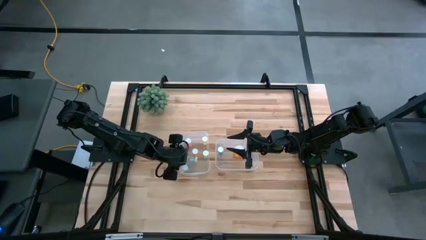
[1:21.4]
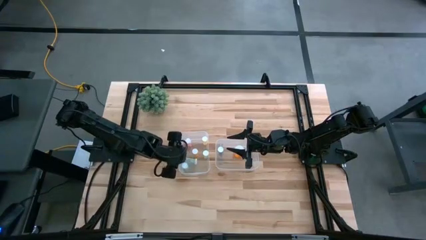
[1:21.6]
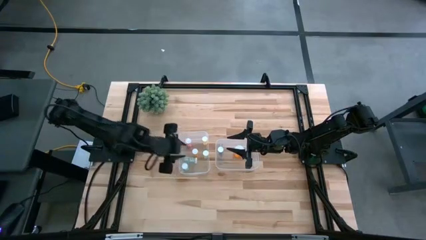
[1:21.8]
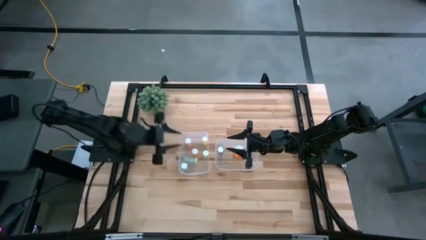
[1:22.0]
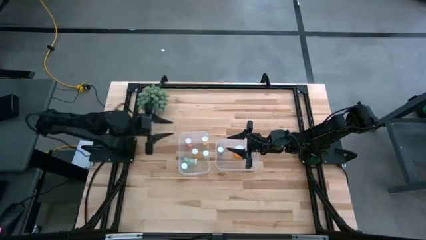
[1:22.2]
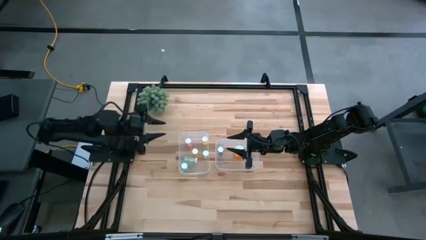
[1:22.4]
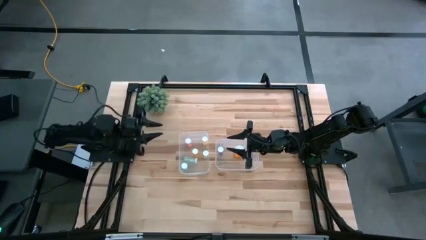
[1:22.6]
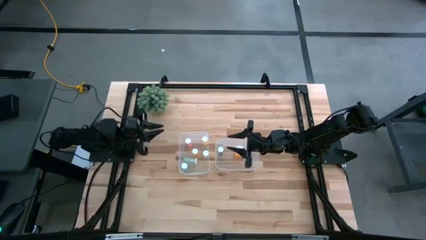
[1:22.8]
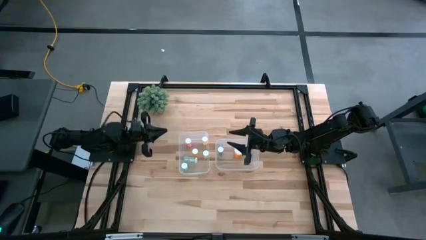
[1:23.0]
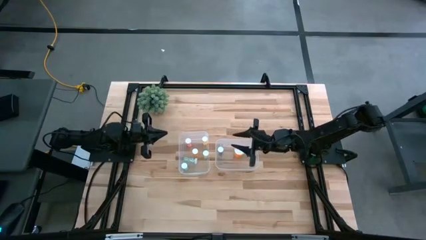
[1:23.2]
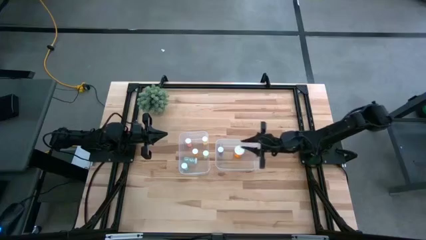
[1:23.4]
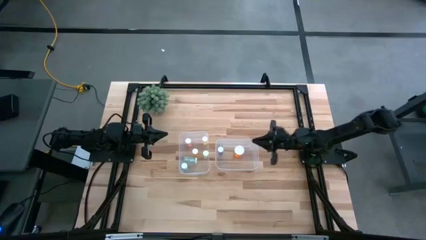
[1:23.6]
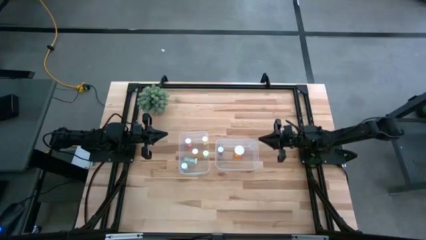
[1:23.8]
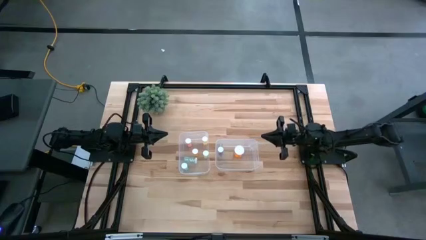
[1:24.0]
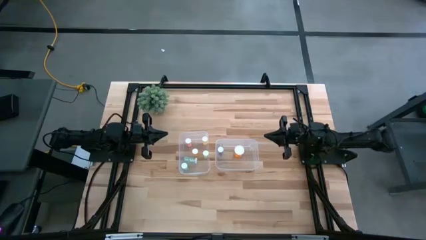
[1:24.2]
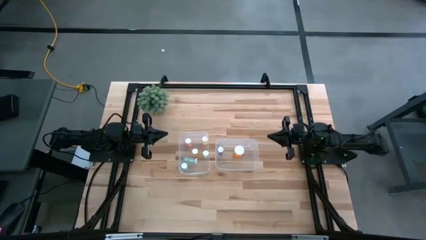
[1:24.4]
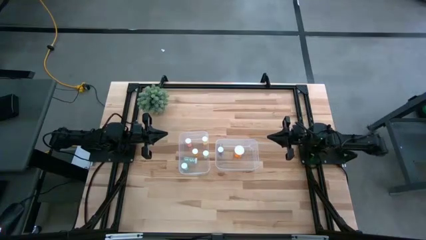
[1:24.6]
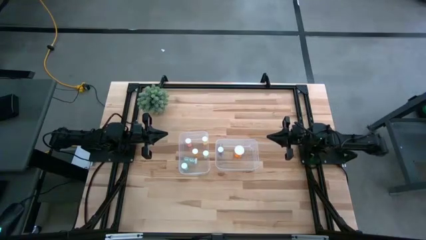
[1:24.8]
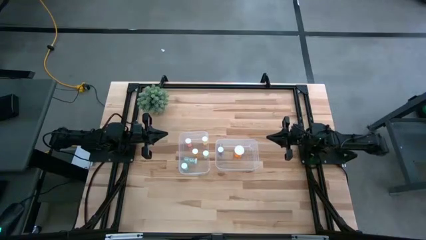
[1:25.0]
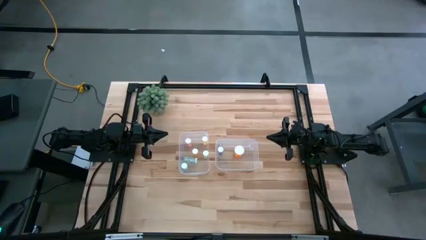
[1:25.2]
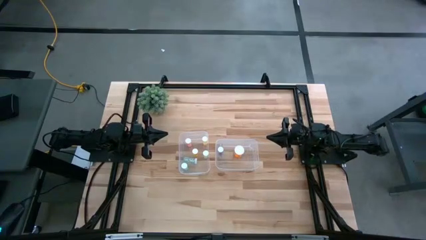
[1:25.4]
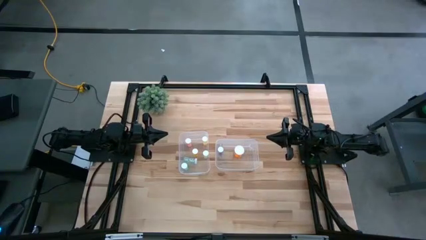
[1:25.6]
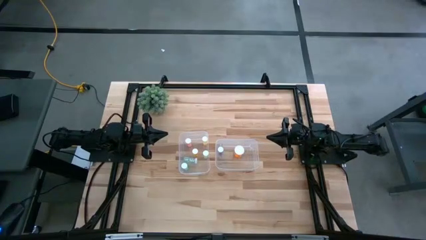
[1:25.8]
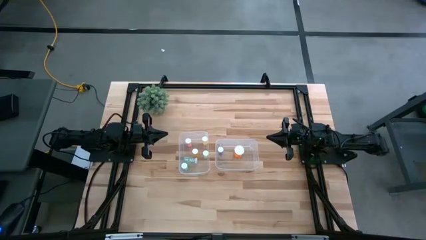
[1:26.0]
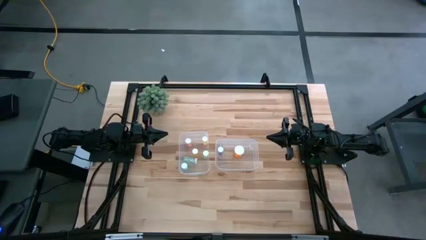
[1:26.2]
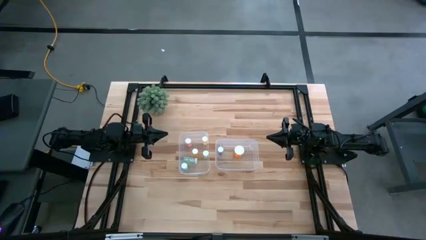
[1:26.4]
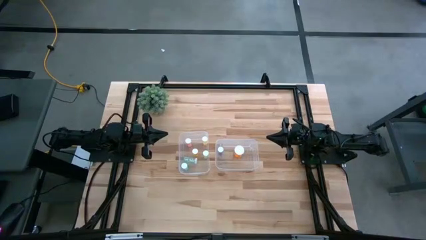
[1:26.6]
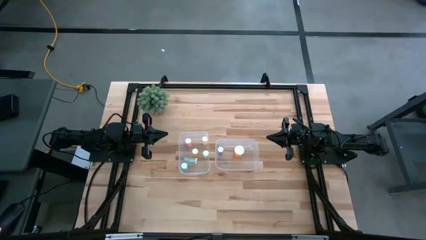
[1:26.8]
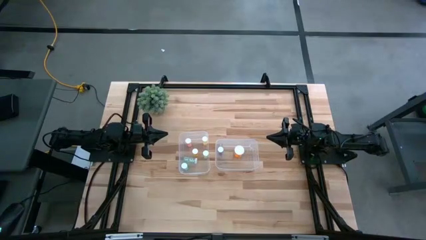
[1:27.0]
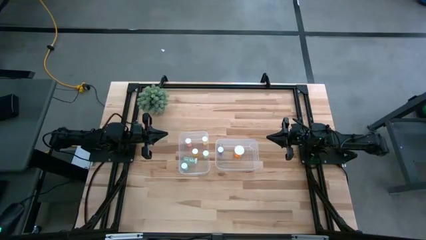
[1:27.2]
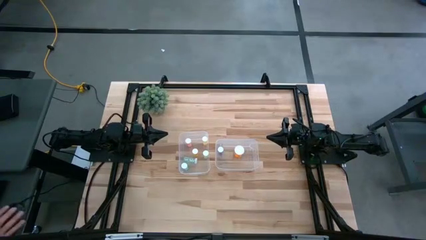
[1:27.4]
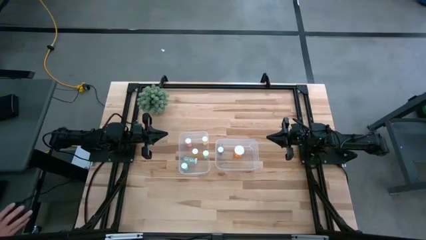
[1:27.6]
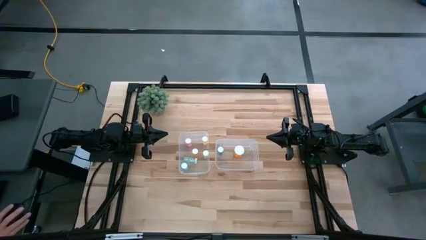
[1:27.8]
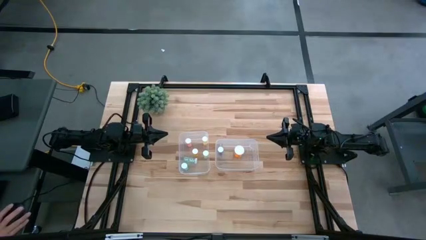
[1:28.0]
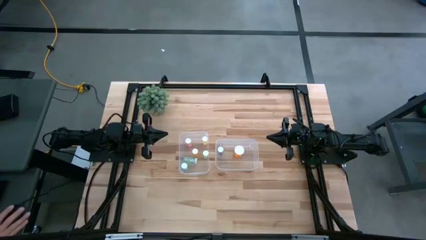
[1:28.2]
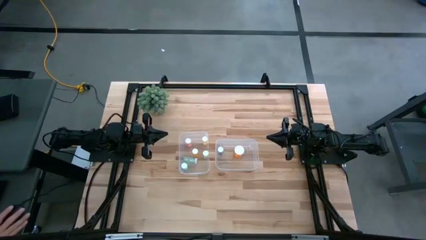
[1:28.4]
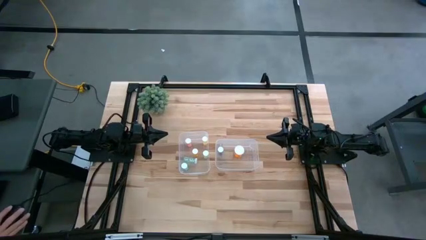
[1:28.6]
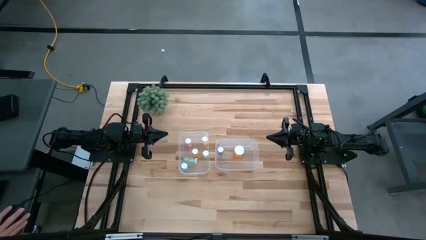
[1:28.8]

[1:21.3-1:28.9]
Task: Pick and place medicine bottles into bin by pill shape (circle, oval)
Return to Home Position

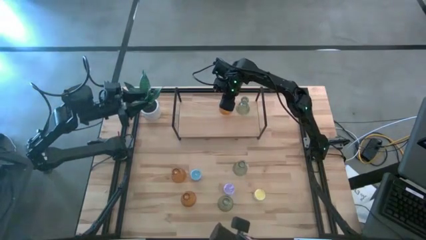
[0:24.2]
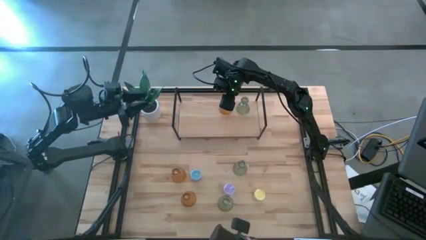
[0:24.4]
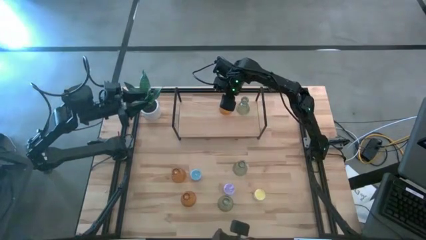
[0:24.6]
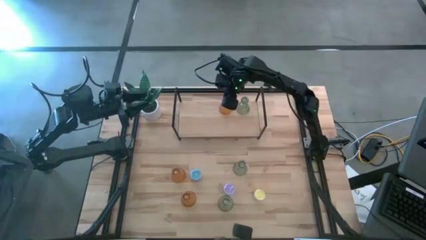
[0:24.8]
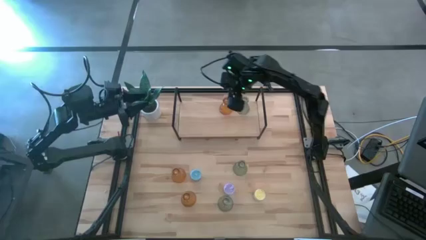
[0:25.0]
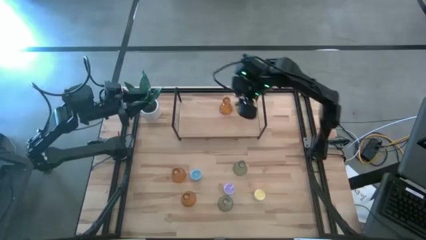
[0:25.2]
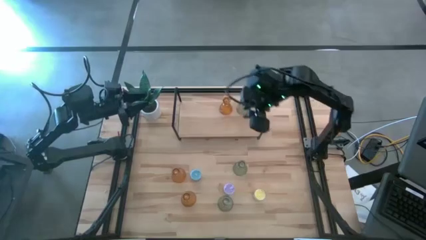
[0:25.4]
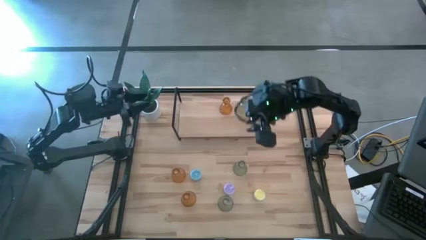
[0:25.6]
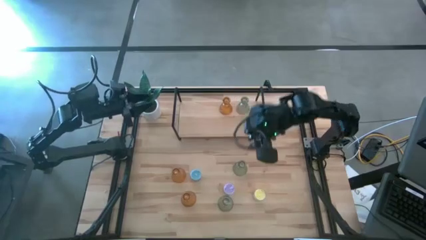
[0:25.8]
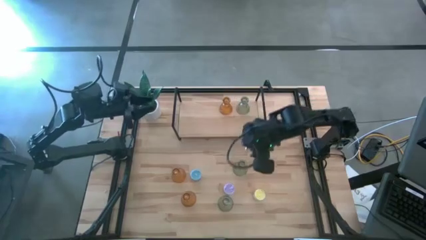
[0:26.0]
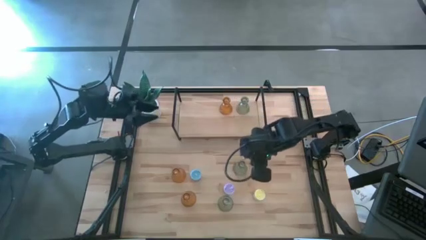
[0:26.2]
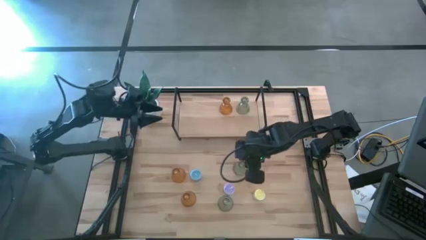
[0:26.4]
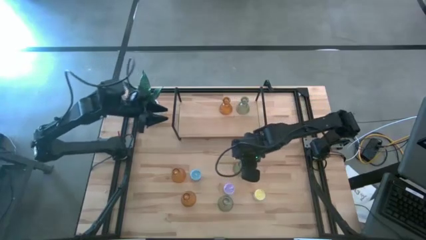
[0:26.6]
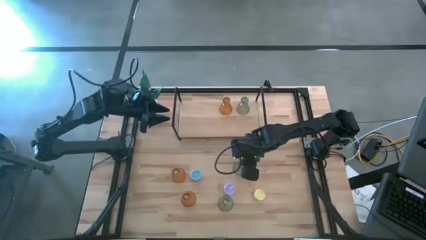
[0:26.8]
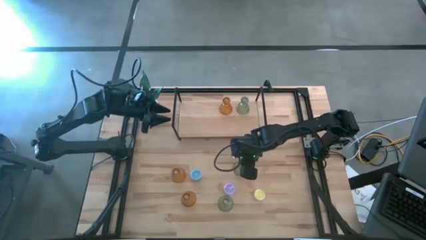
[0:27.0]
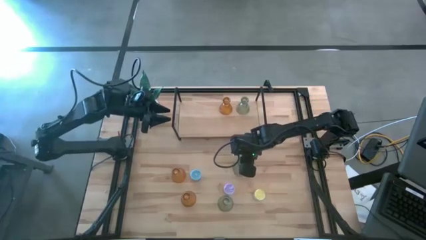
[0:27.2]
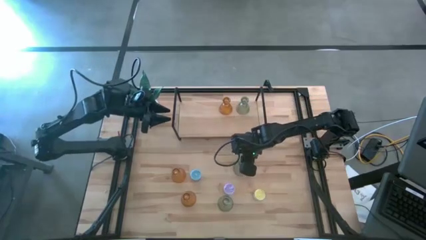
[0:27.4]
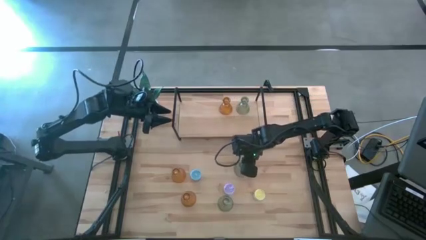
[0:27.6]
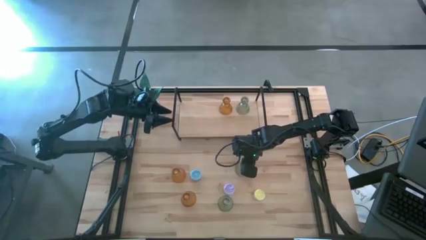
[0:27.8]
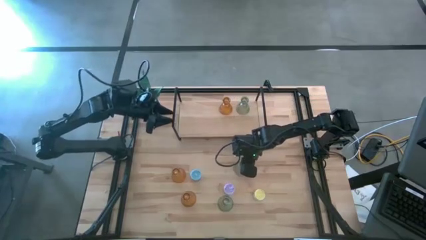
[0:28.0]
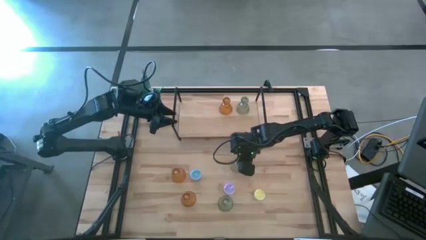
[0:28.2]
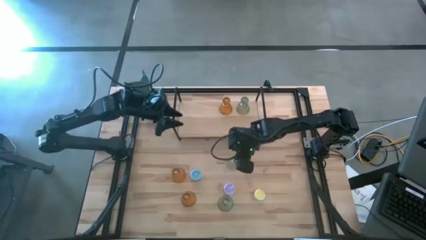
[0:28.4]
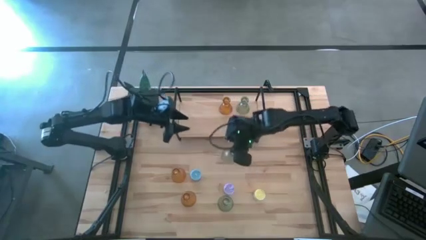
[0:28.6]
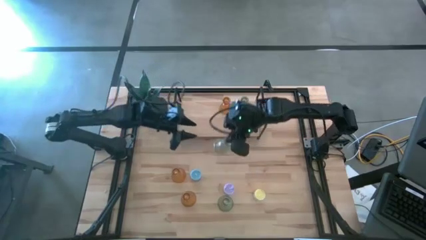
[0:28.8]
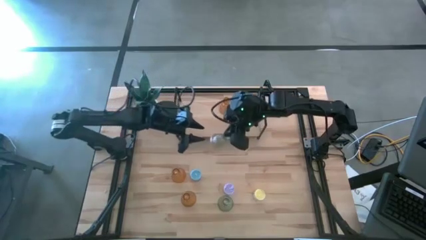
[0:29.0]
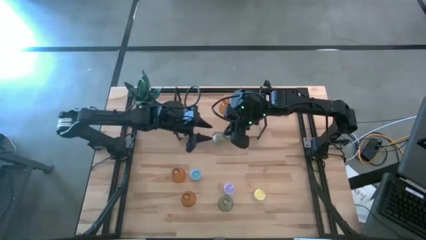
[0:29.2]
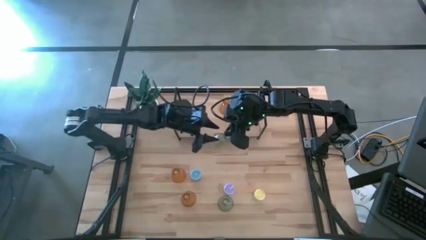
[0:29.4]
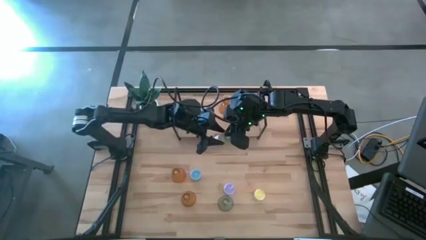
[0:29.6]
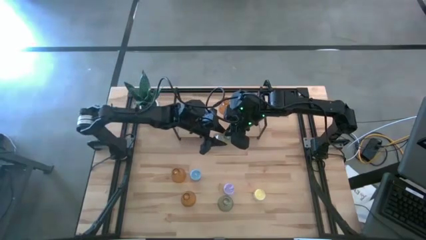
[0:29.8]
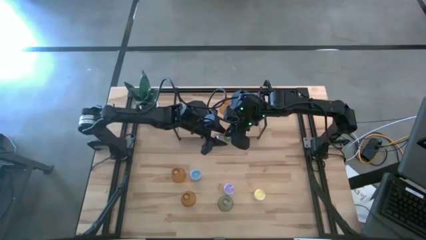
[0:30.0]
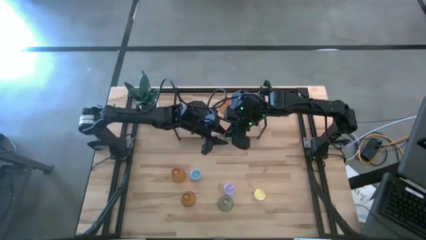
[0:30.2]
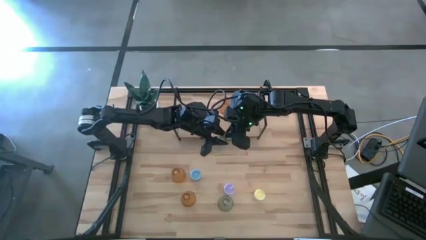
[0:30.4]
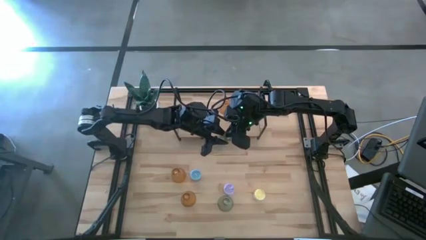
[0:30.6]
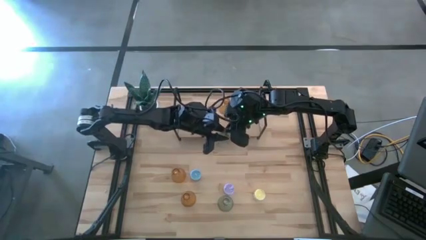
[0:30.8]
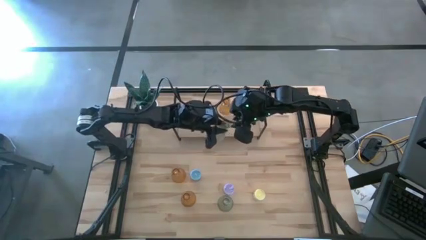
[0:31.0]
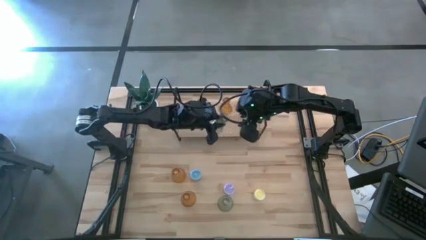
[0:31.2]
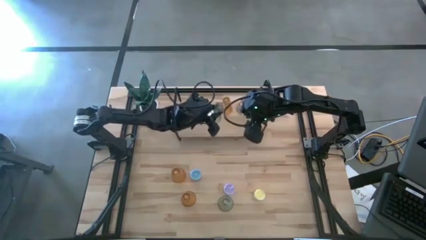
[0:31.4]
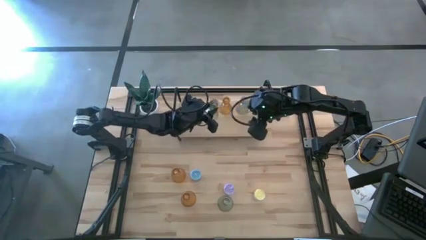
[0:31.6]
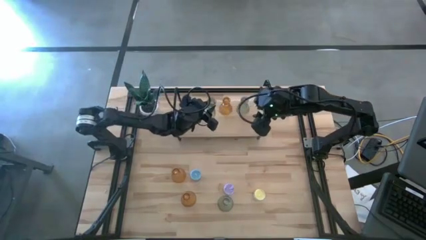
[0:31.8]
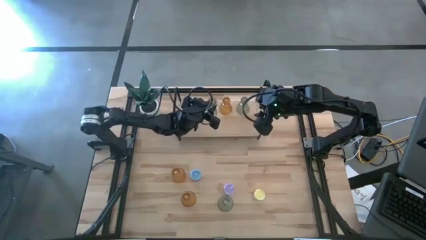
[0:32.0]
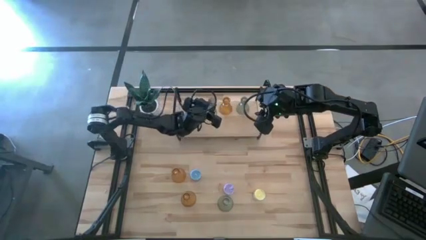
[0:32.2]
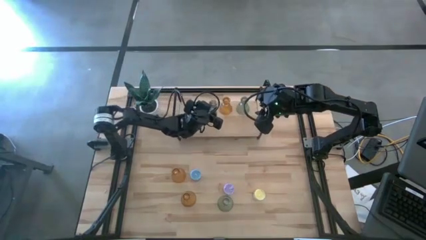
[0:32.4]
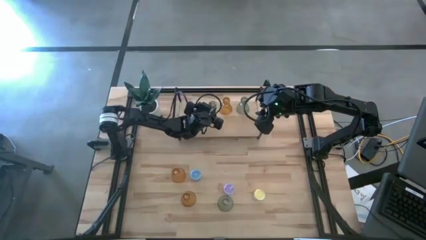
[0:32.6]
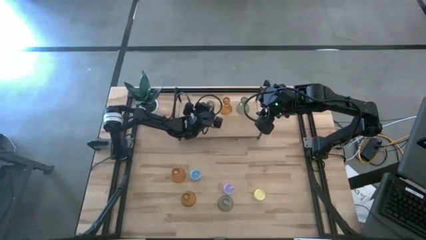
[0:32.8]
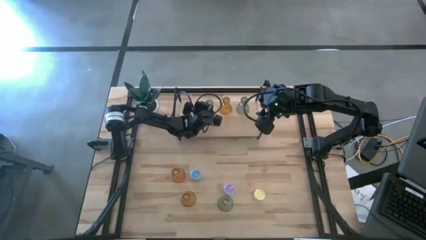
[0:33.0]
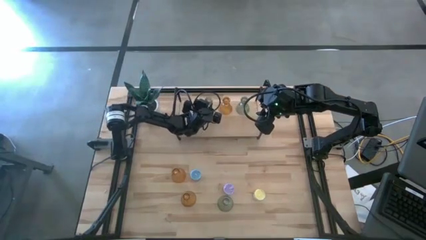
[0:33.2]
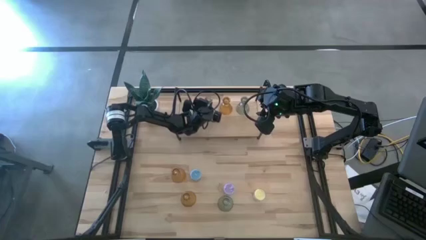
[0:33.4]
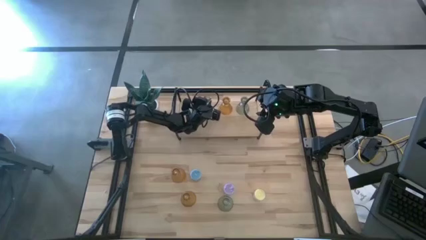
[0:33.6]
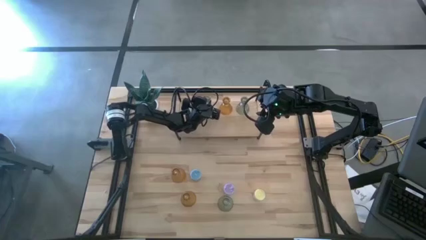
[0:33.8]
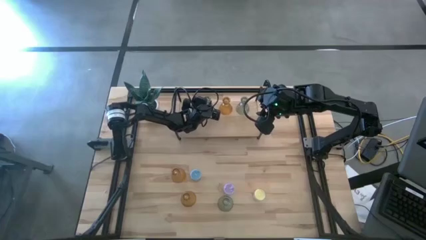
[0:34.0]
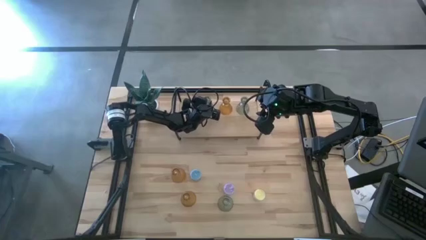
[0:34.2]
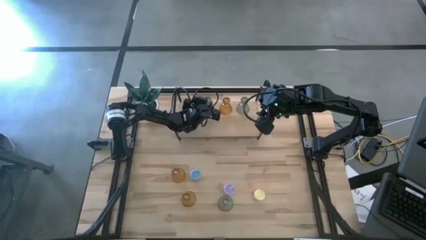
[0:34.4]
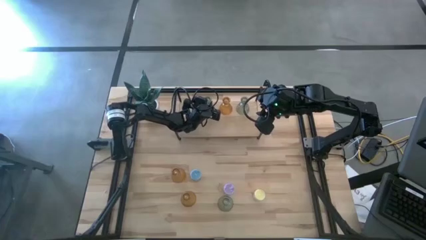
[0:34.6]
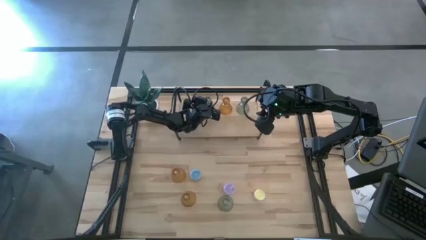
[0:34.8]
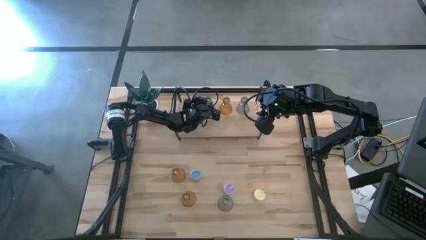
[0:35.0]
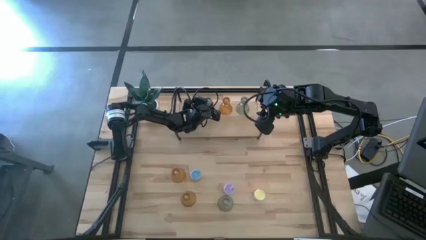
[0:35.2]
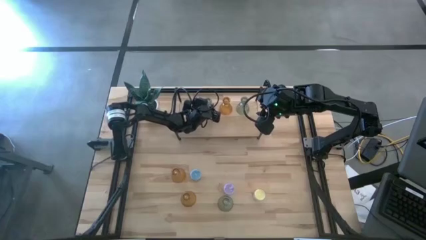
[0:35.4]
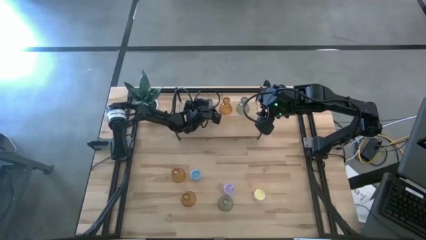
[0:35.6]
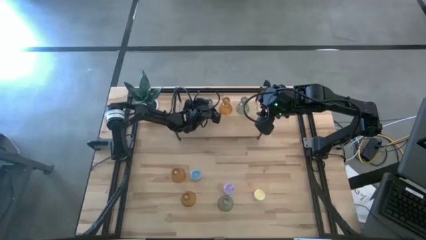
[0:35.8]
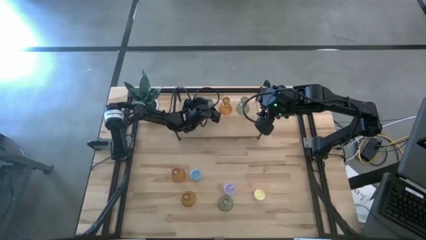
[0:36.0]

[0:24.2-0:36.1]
Task: Pick & Place candle stick holders
Put the top green glass candlestick on the shelf
